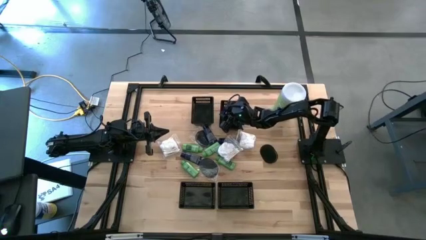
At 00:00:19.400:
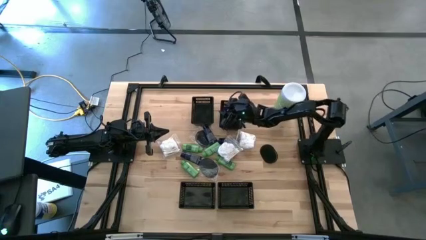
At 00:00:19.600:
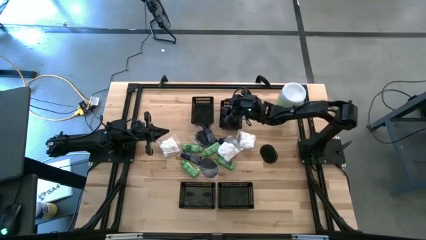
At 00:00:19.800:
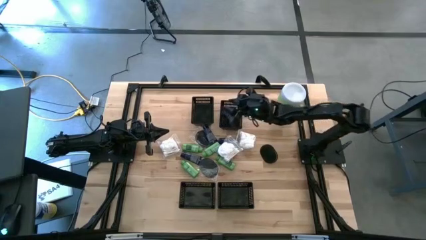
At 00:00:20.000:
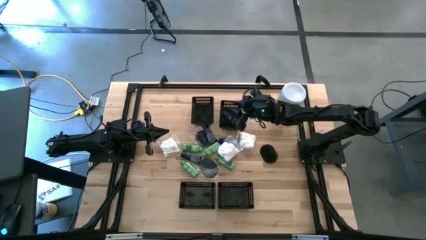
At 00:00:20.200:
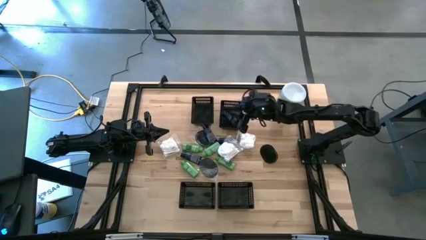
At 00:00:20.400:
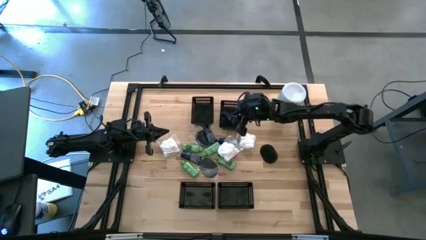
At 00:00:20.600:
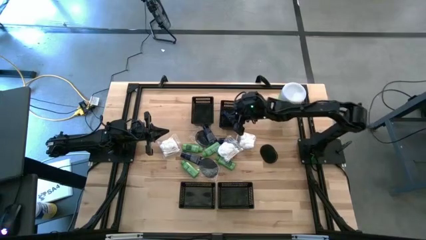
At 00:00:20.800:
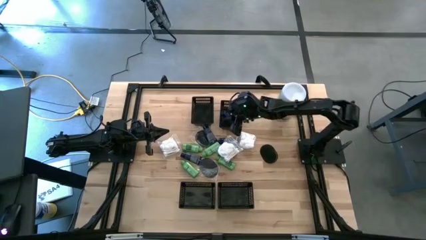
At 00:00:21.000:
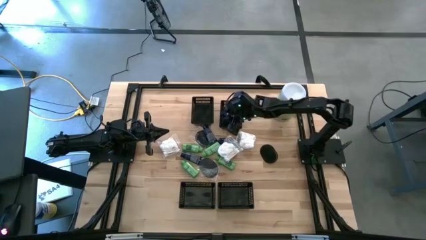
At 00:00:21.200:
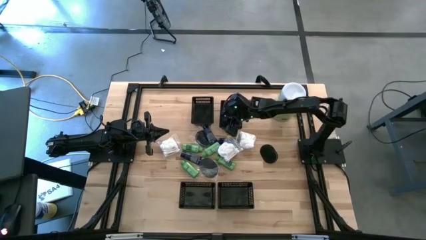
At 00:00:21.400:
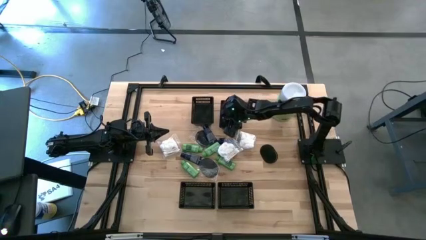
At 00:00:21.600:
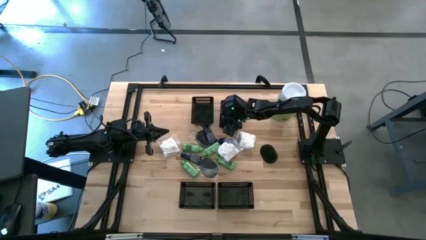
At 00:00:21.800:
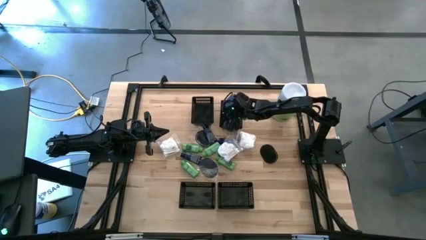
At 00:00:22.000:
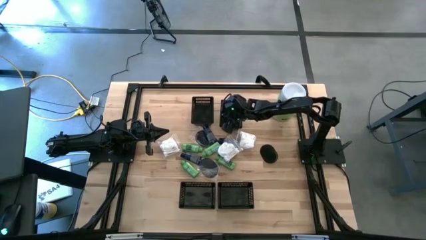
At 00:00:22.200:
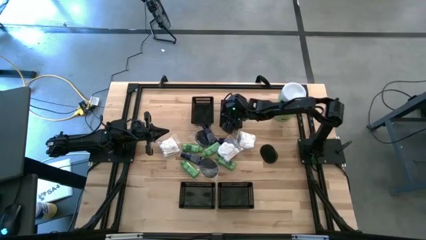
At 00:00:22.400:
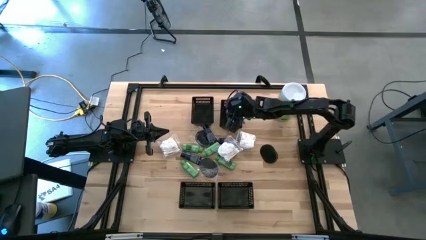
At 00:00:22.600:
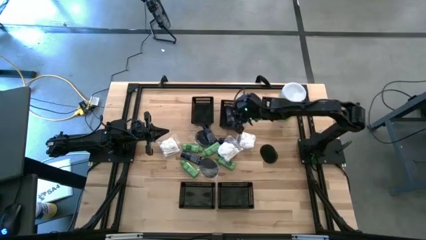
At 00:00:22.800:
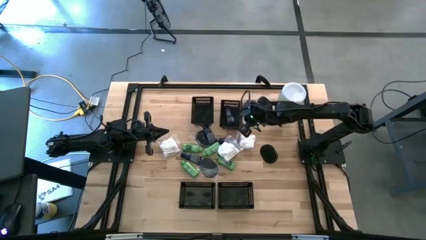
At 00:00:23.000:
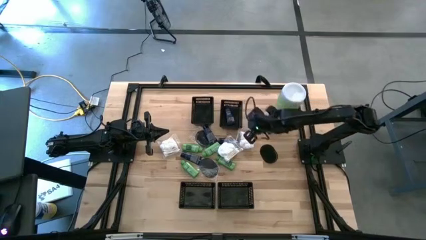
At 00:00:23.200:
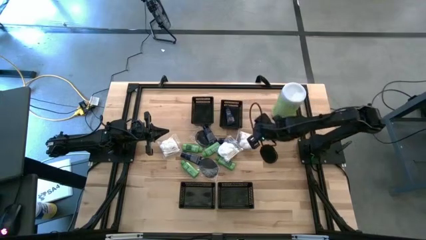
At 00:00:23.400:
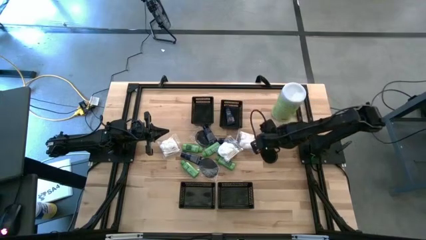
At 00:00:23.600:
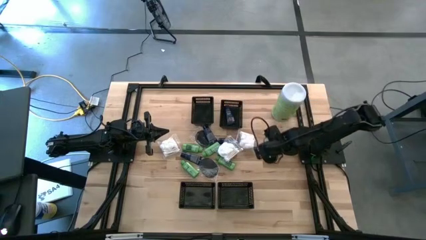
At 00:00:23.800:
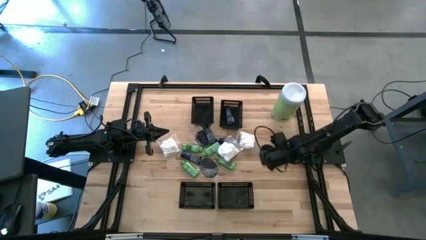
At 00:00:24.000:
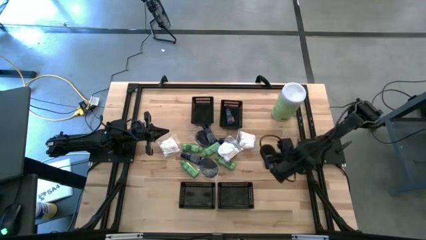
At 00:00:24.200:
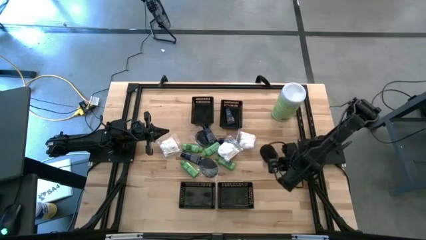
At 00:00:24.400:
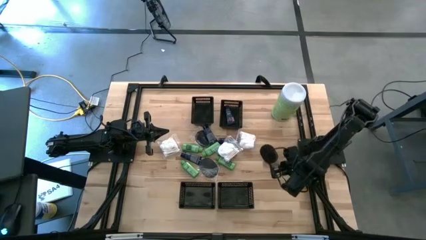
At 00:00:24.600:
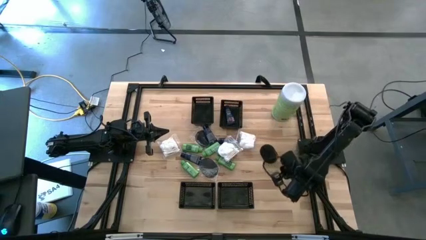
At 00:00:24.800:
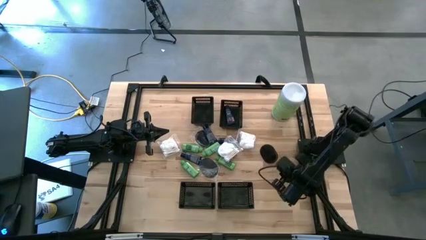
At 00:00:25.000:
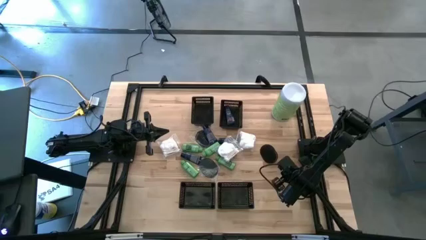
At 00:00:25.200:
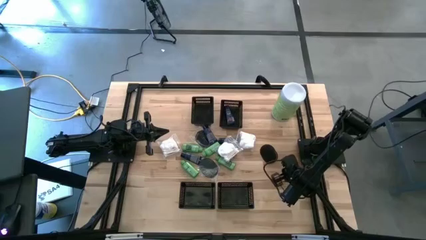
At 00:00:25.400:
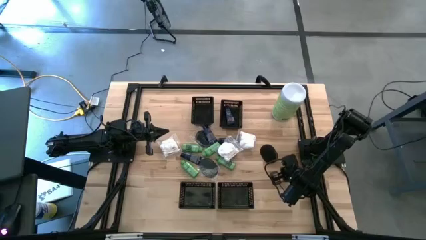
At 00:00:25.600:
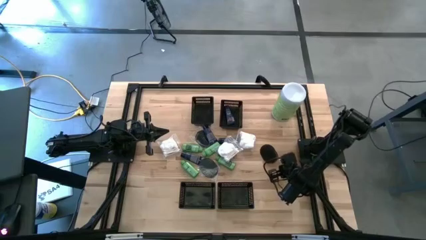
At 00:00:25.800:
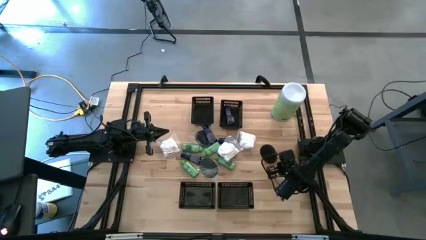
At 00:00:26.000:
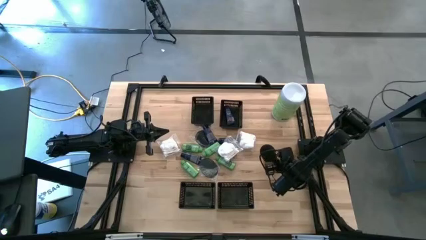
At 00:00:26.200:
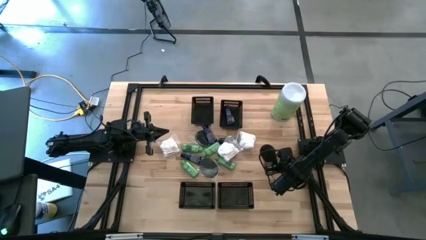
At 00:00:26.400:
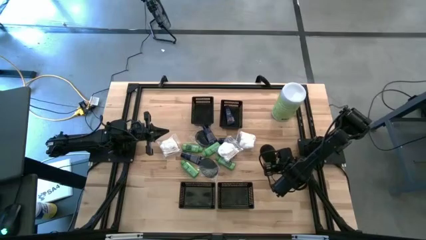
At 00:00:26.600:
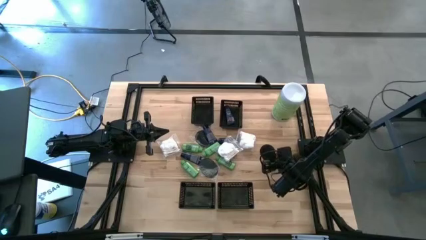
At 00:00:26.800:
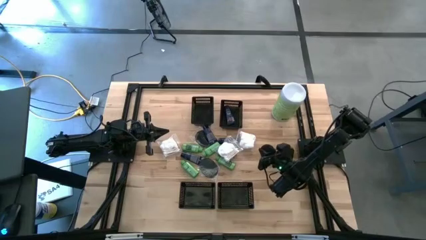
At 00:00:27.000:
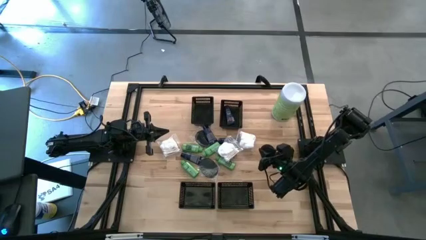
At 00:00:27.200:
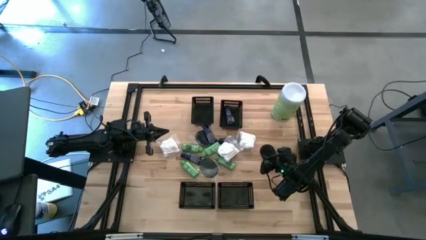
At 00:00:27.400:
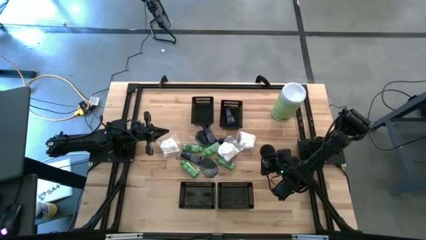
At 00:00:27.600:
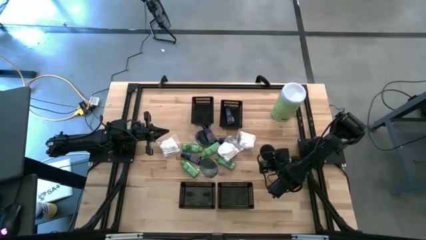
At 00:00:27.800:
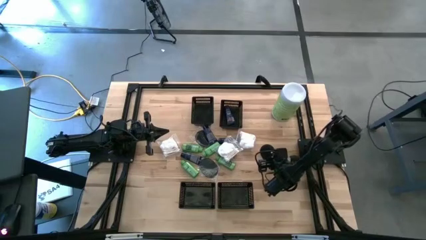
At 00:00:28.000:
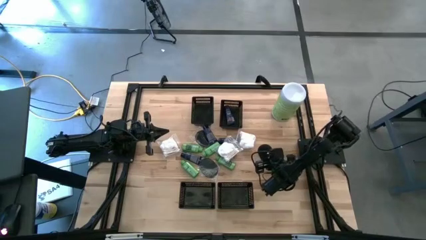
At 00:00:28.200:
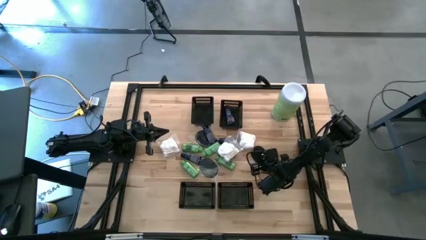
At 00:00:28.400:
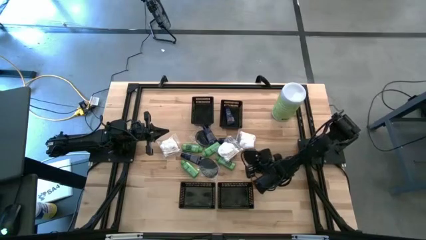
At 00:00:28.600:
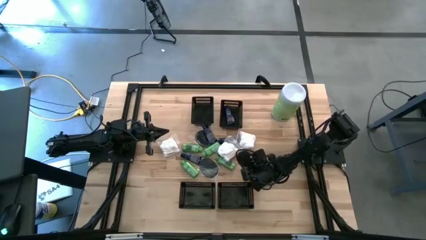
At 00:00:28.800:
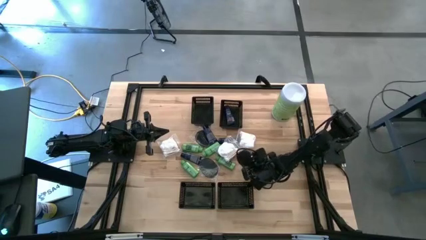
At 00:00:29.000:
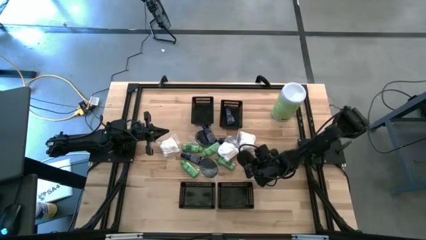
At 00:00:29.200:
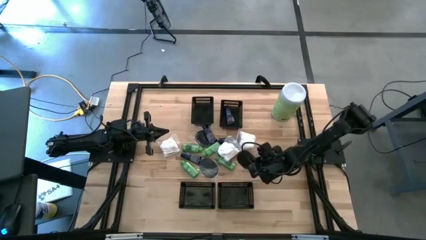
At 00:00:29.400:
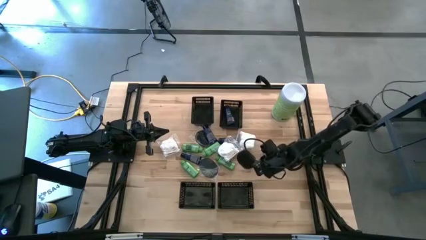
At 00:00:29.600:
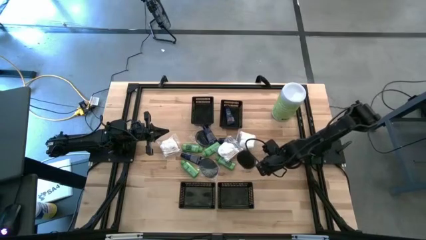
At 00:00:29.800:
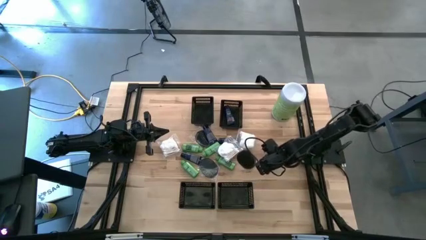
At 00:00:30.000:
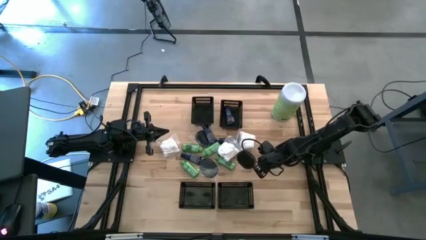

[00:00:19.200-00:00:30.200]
Task: Pick & Place Travel size toiletries
Put the black hairbrush into the bottom right black bin
